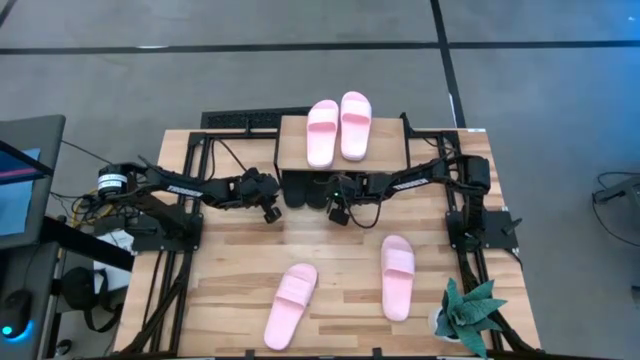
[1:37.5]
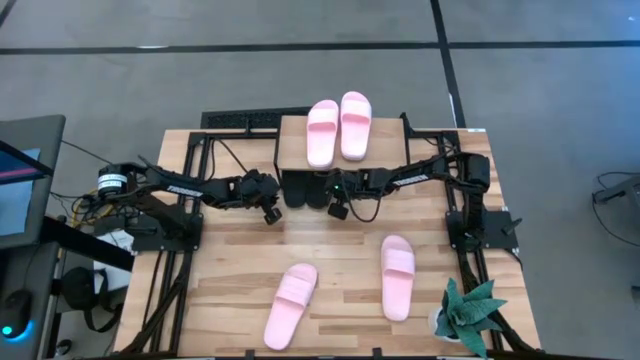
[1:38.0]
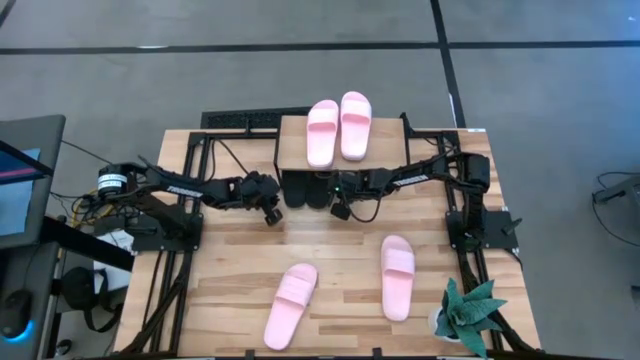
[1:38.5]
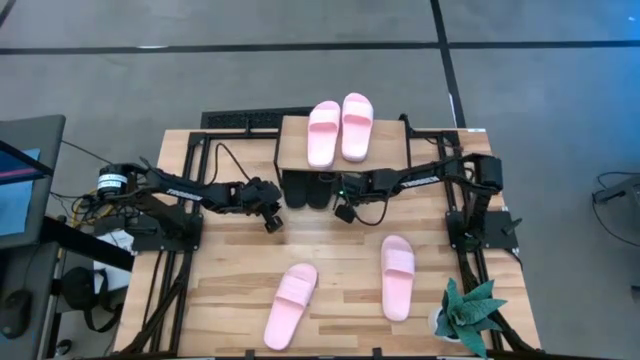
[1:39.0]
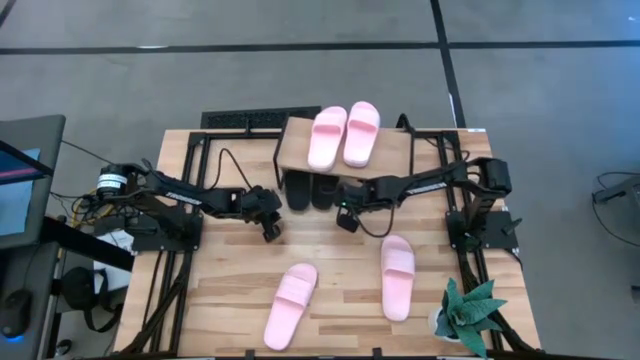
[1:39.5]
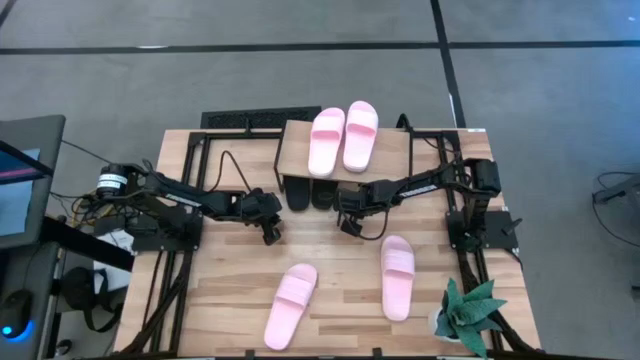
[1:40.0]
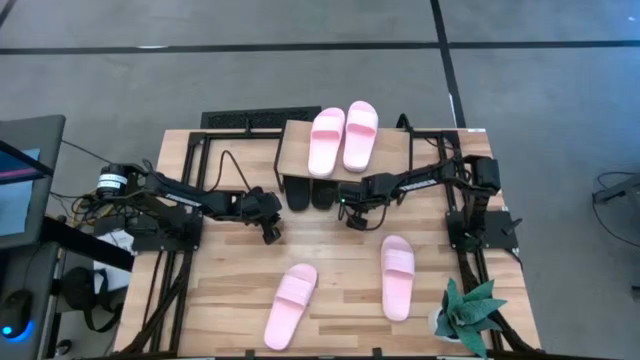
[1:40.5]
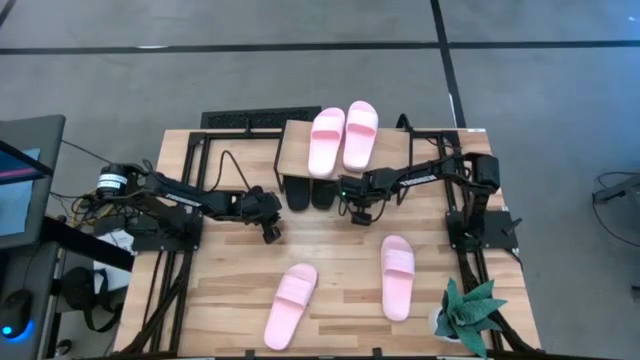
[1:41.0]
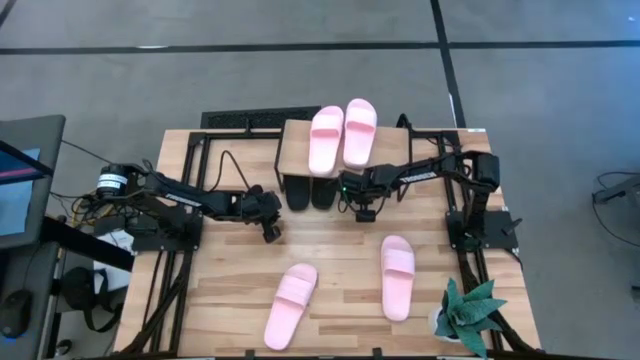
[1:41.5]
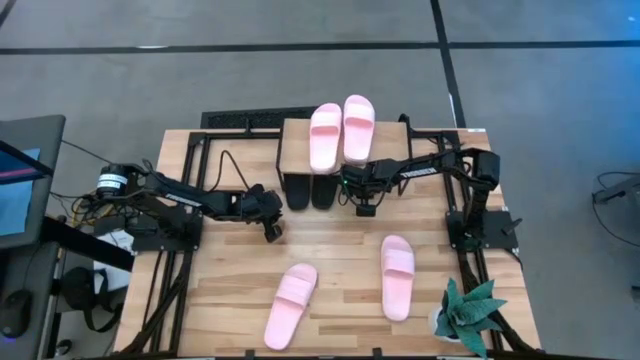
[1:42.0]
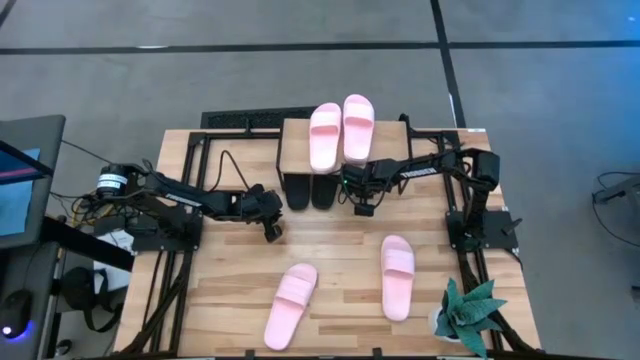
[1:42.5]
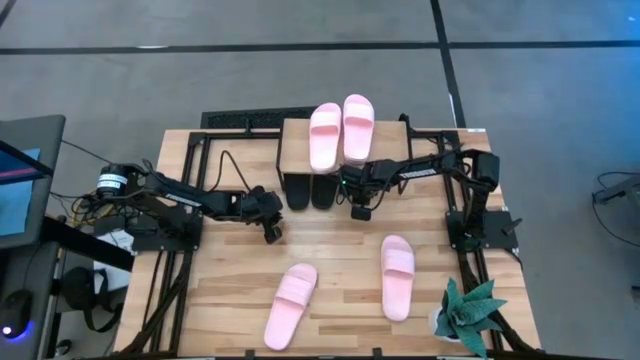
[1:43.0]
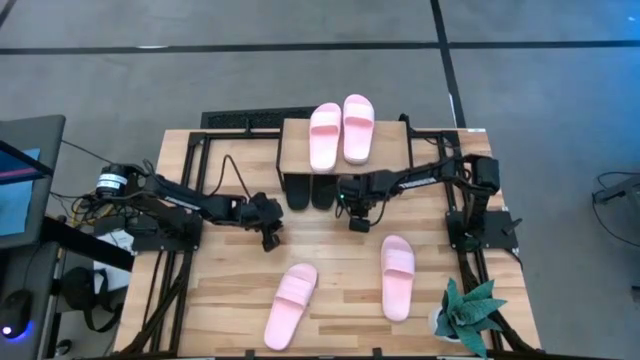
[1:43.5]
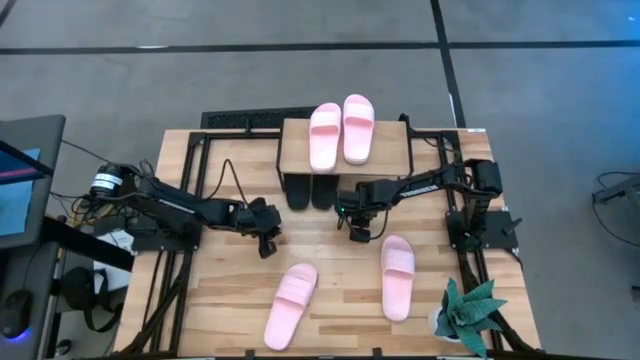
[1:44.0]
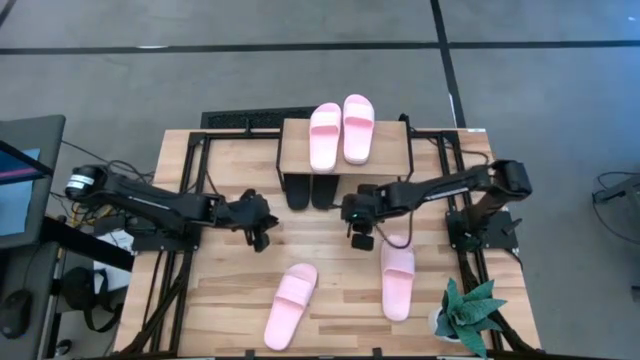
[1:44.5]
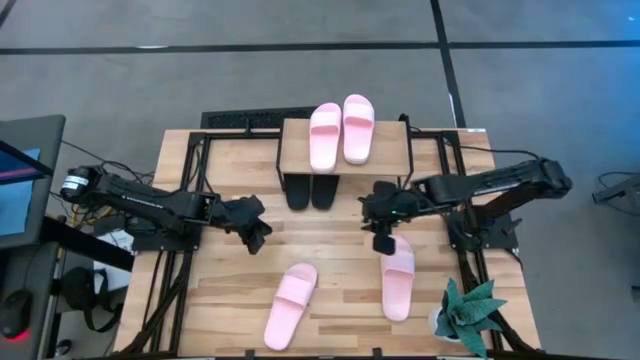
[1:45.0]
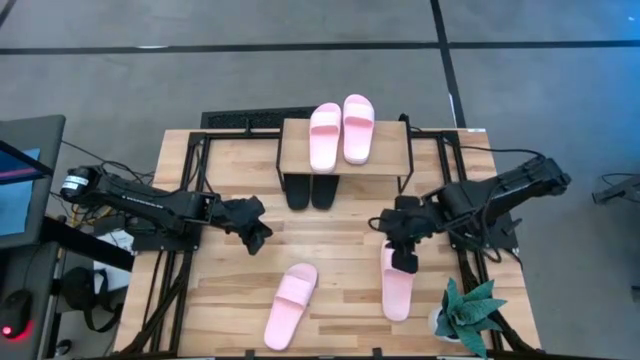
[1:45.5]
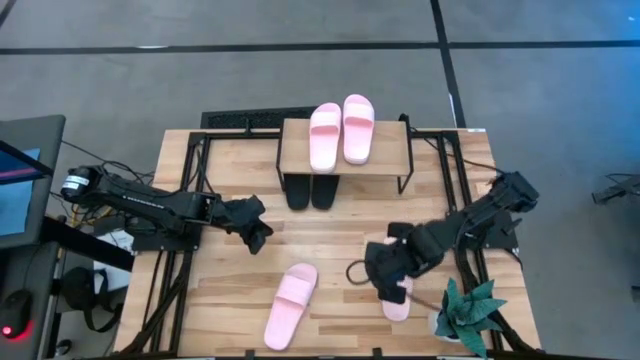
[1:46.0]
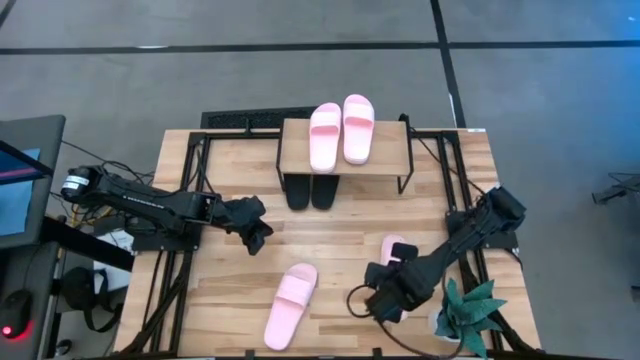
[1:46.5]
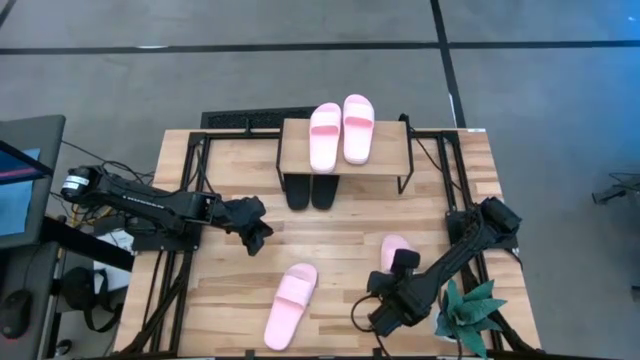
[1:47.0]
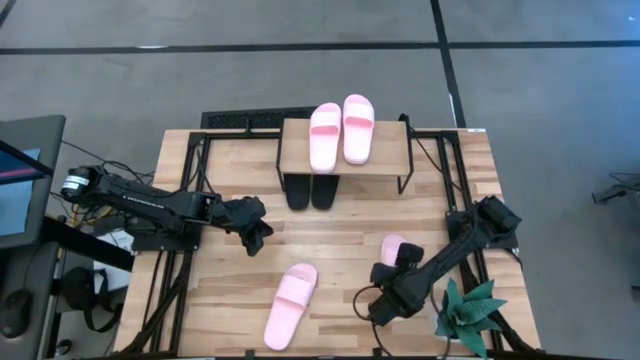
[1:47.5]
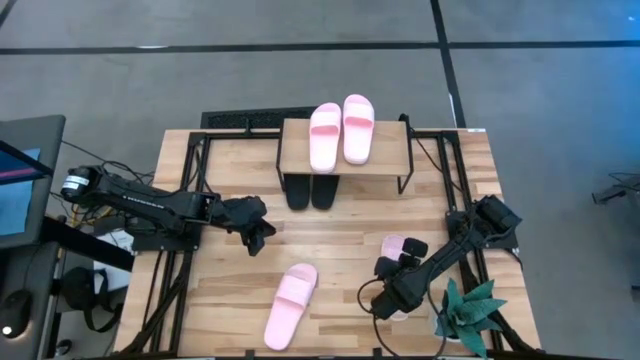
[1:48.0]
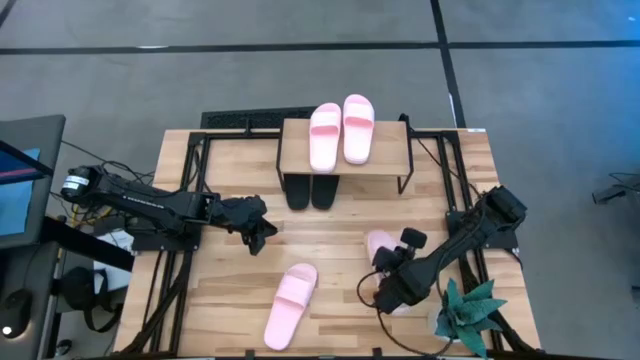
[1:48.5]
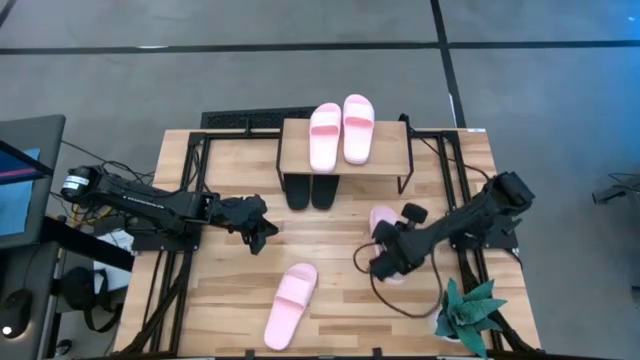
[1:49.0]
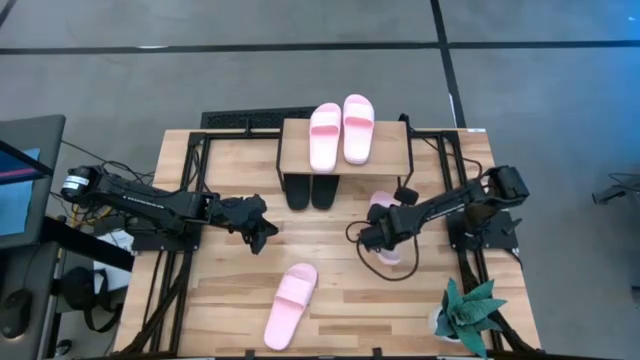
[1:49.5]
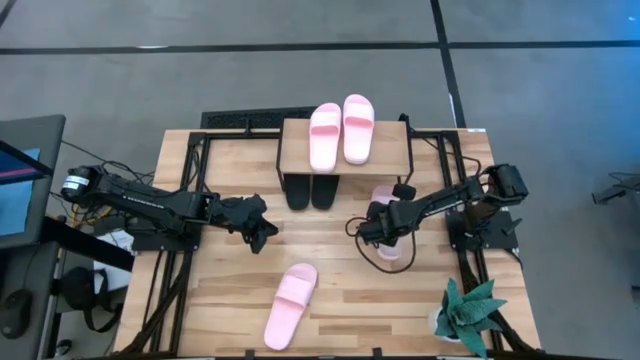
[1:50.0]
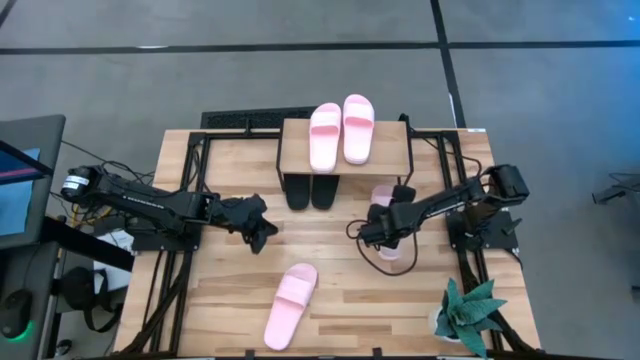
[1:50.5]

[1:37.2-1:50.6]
Task: Pick and place slides into the shelf
Put the right pink slide under the shelf

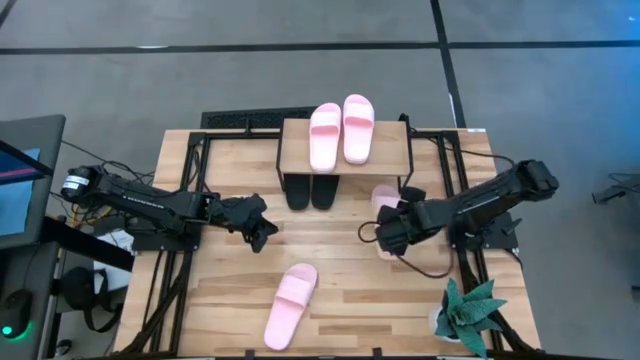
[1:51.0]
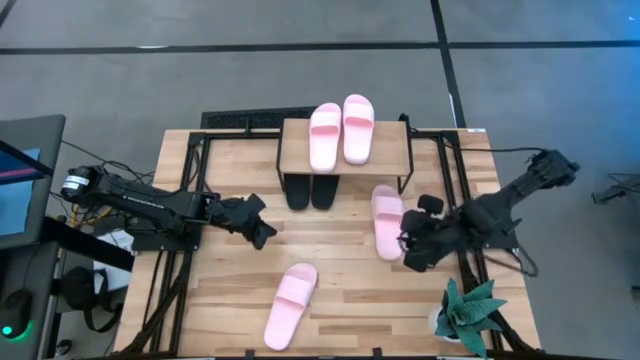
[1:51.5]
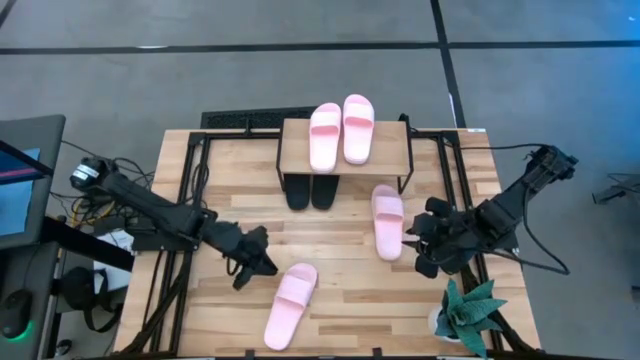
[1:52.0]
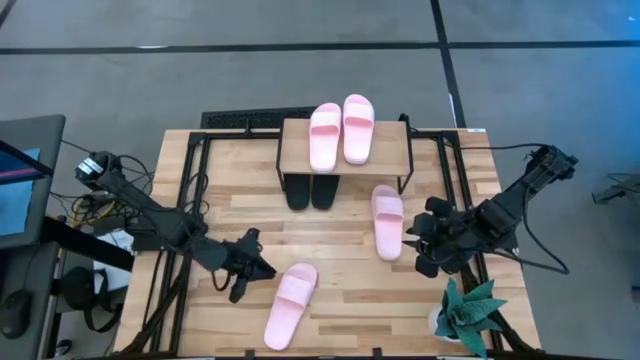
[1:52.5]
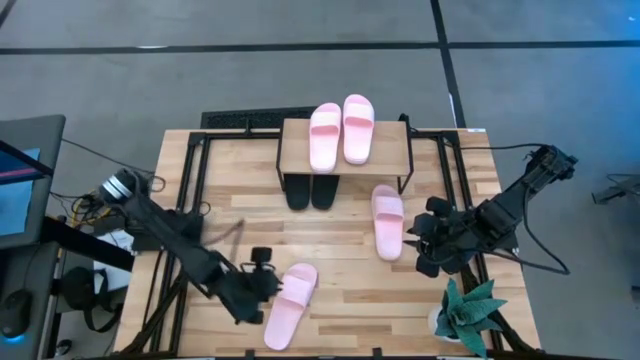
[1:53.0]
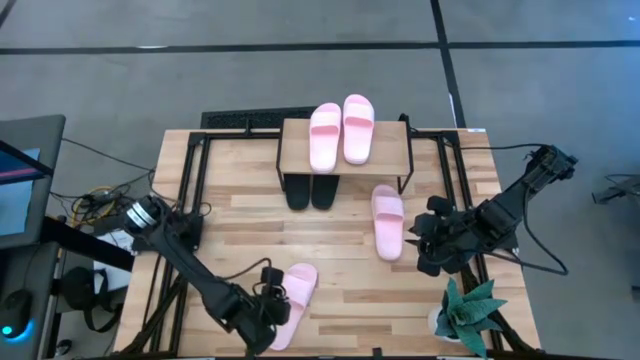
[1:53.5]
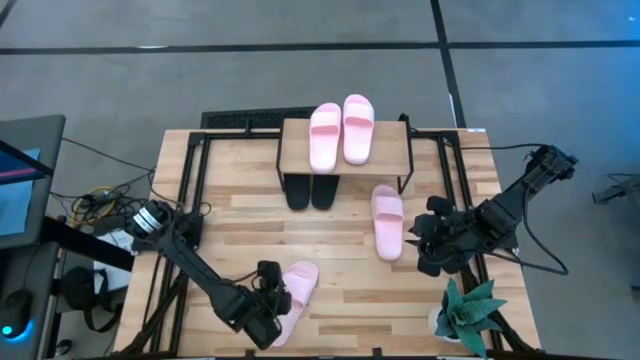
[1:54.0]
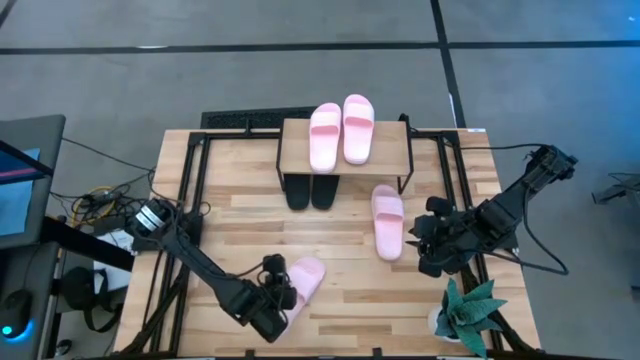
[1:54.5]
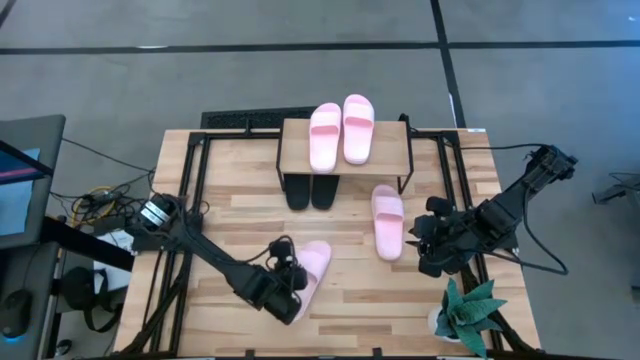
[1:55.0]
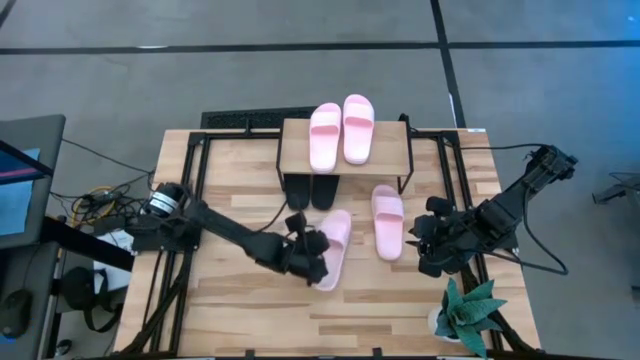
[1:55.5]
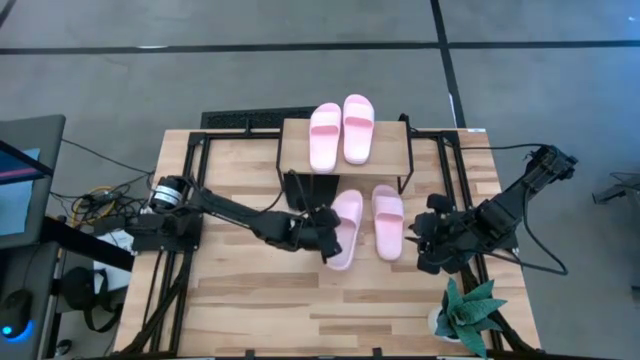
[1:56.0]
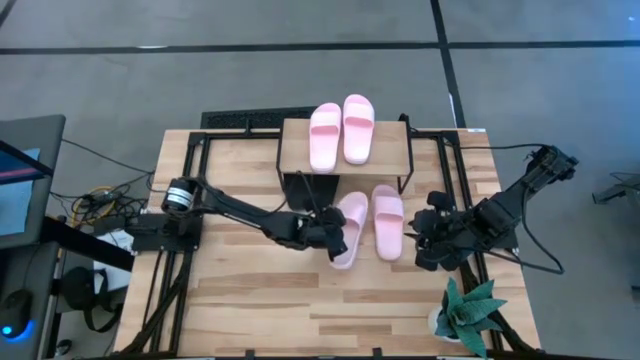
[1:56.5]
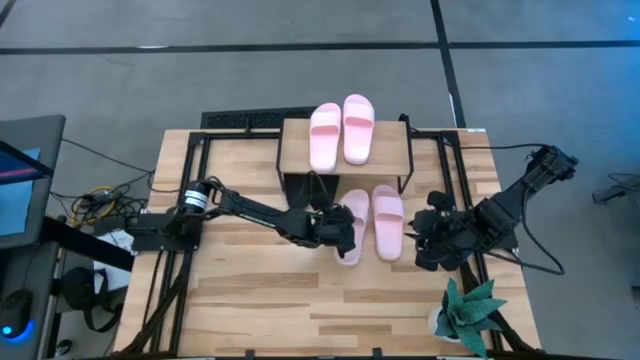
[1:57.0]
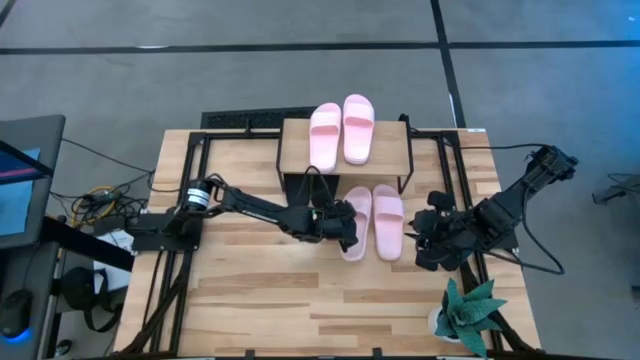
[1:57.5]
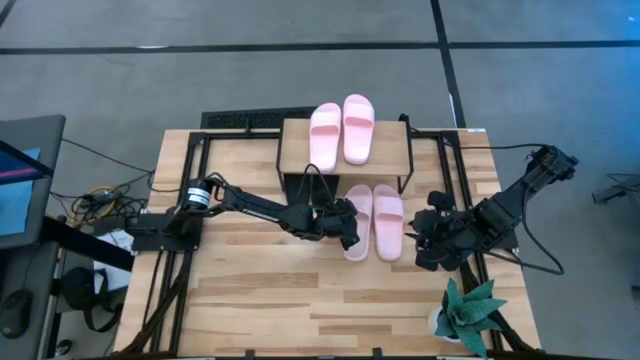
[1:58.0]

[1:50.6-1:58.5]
Put the pink slide under the shelf
